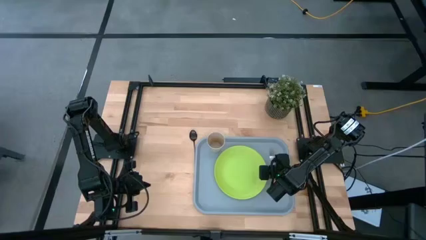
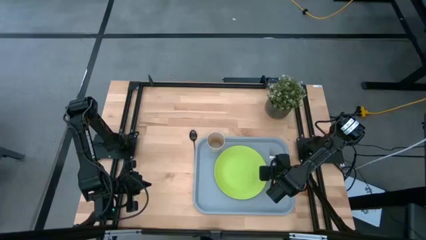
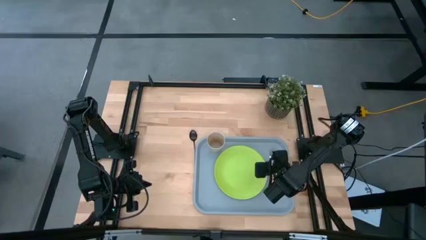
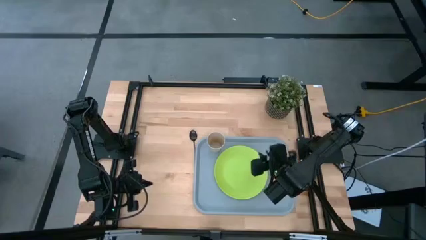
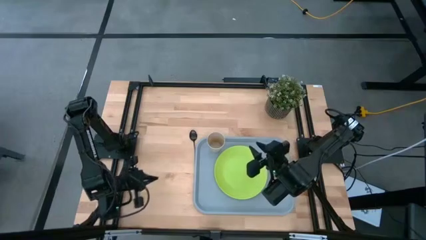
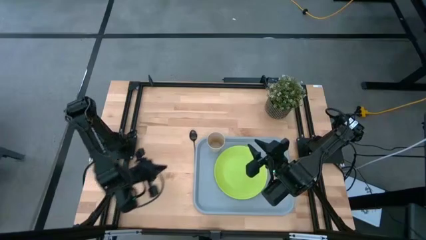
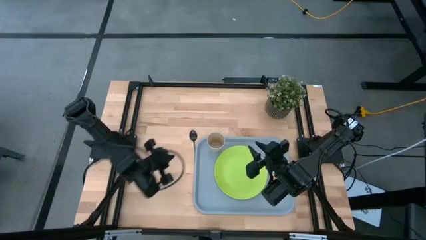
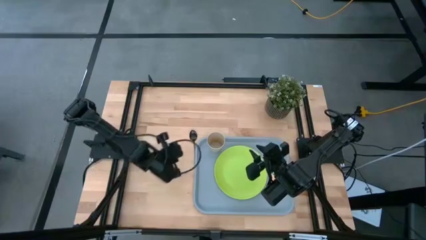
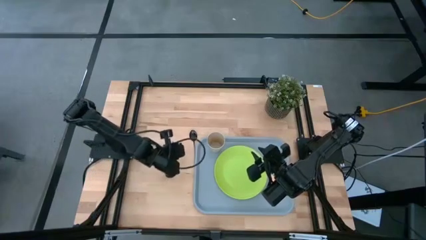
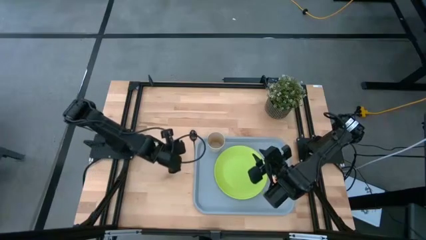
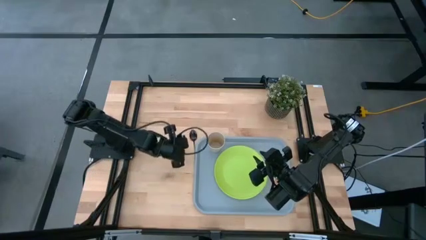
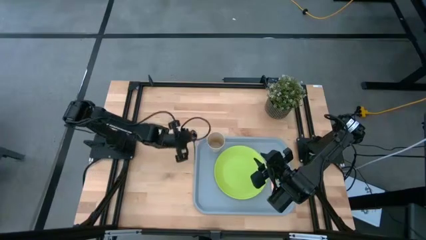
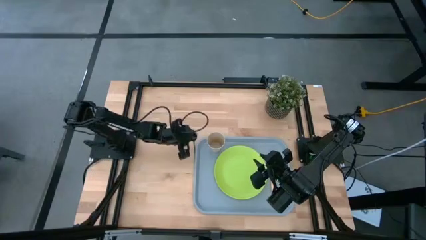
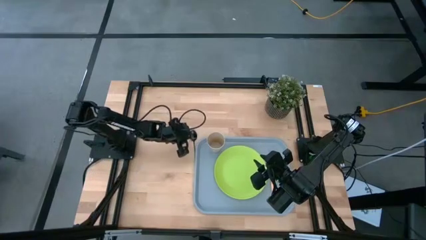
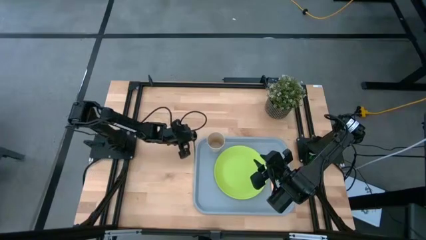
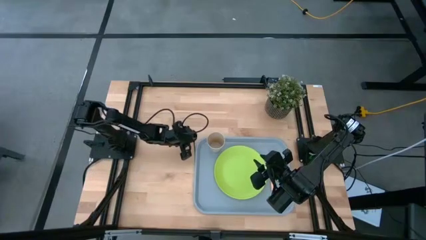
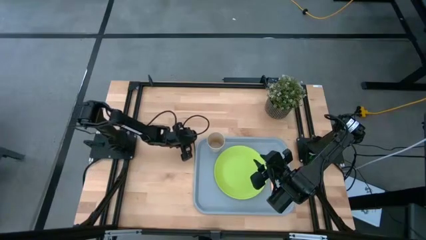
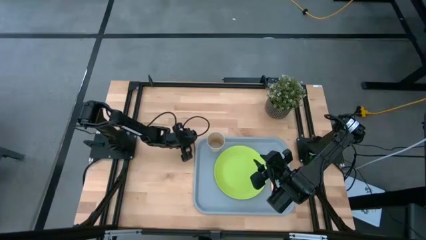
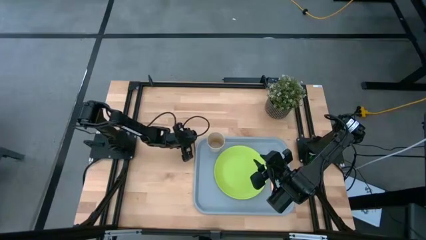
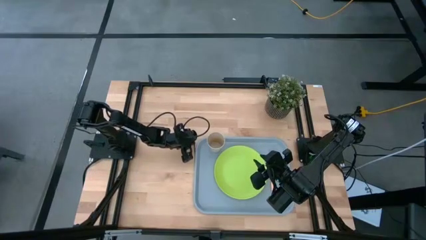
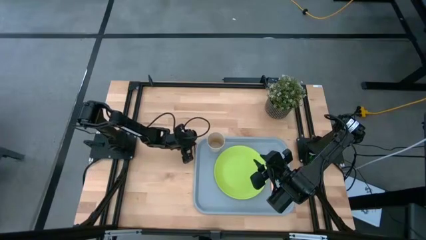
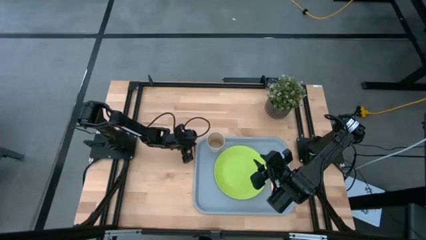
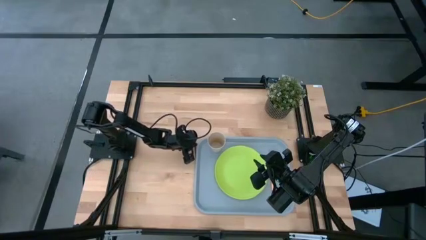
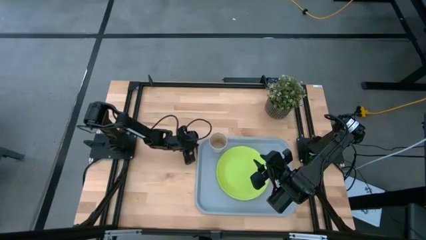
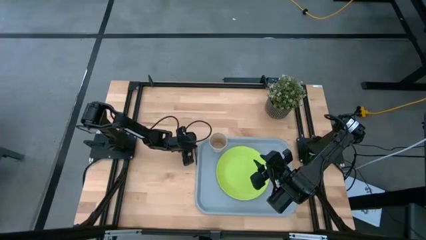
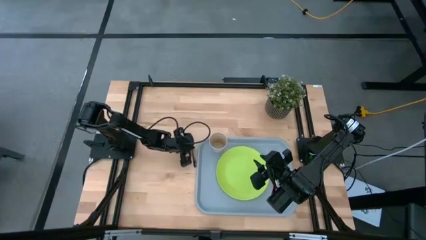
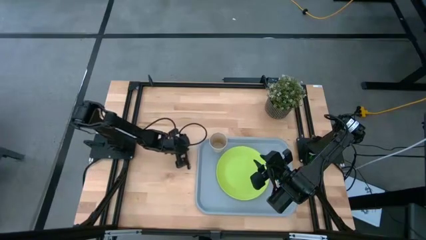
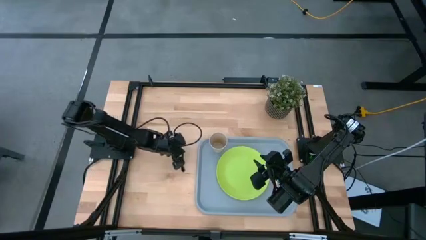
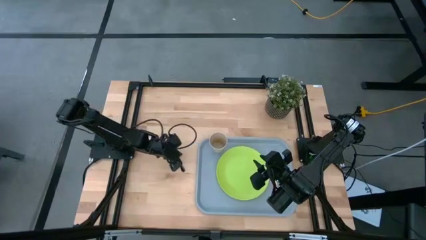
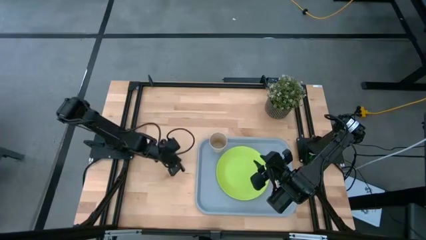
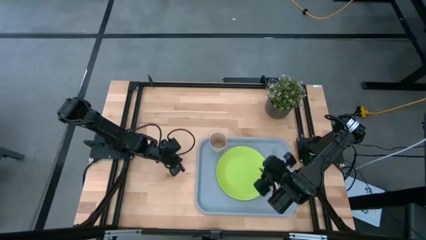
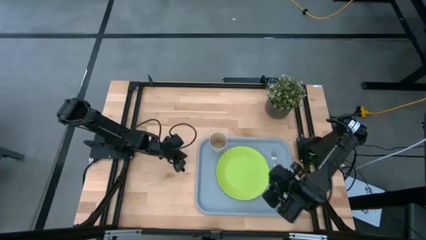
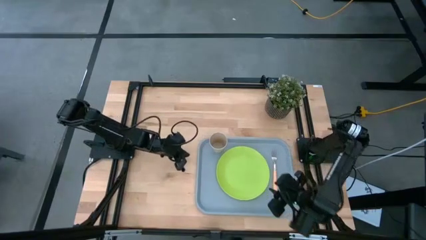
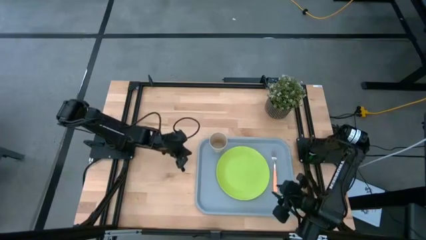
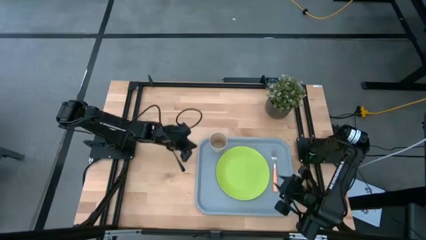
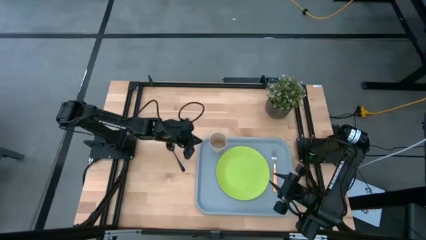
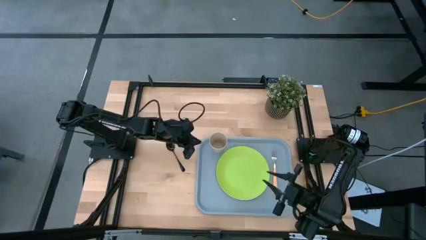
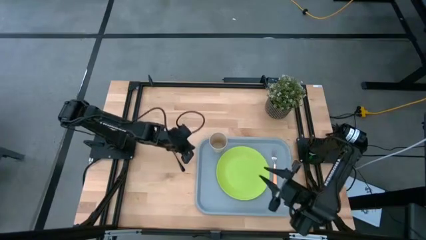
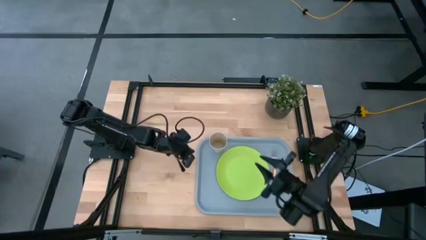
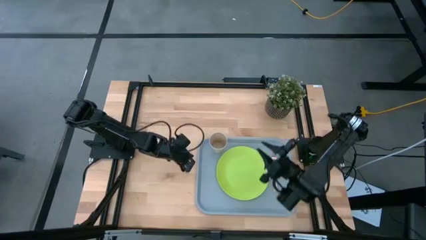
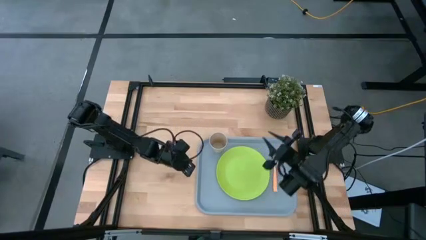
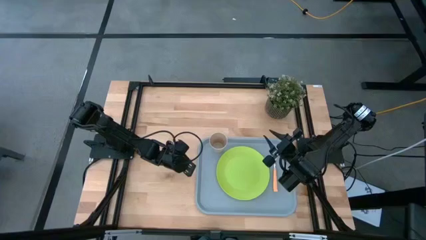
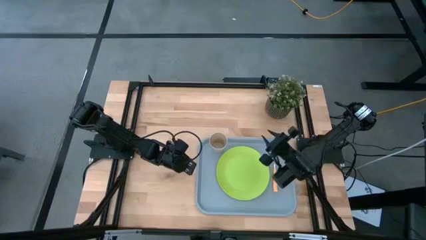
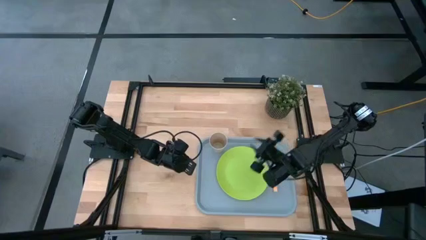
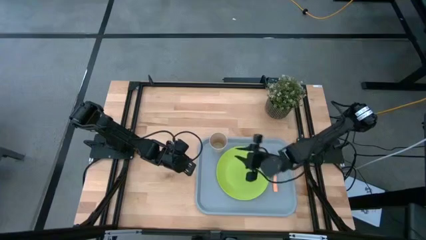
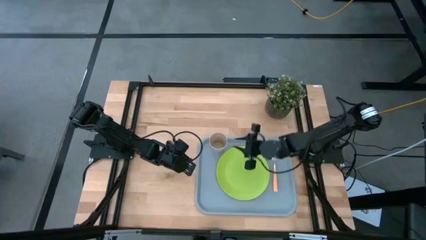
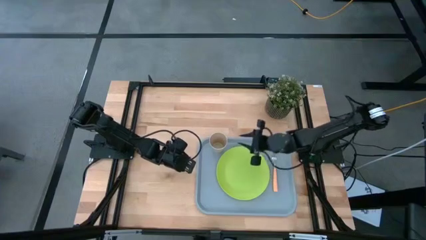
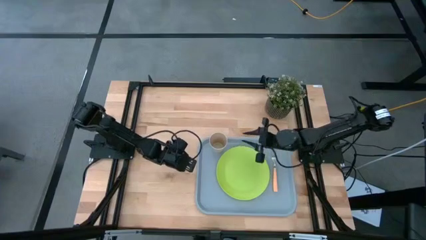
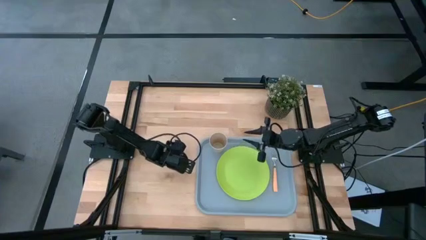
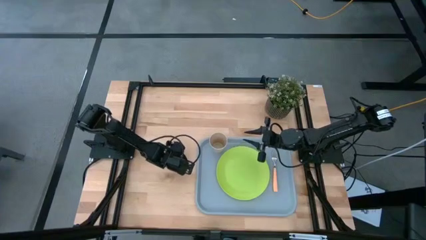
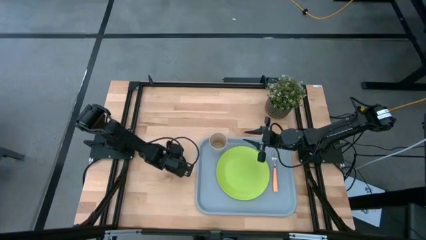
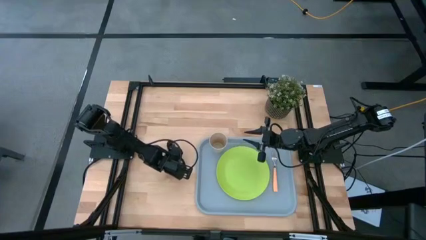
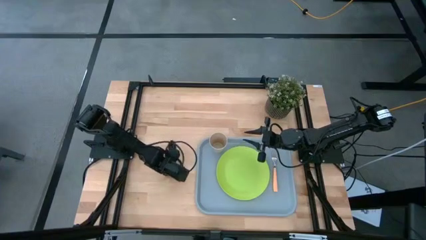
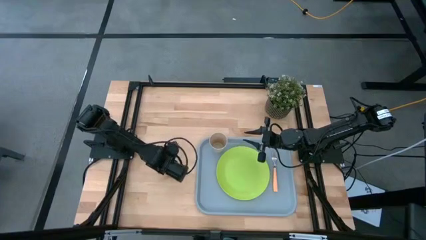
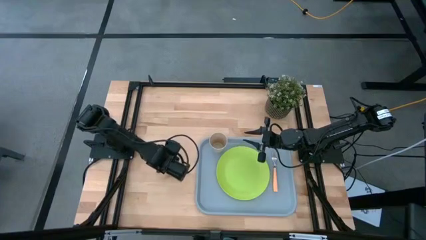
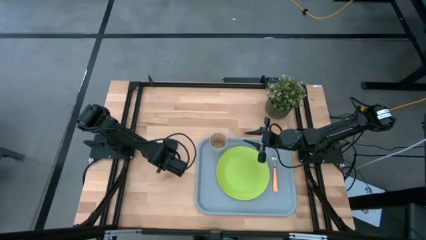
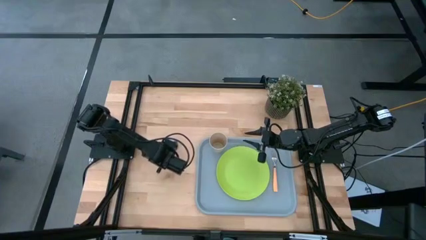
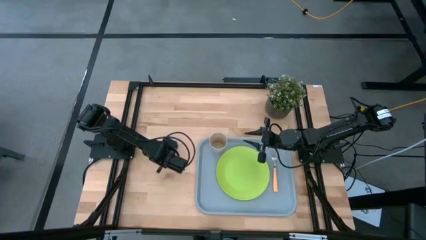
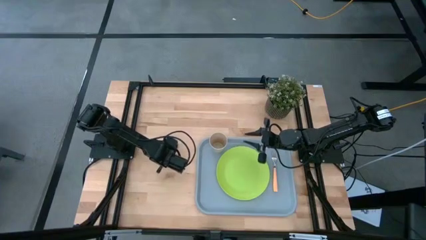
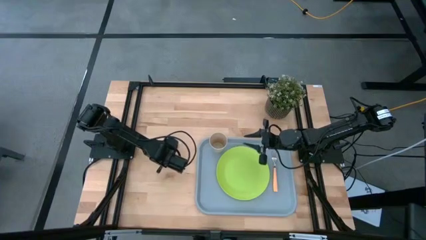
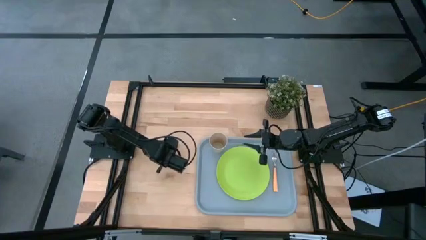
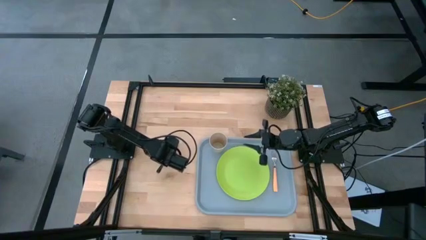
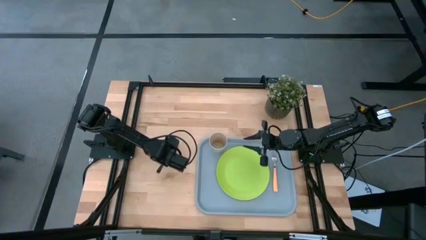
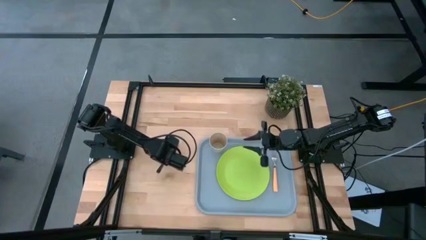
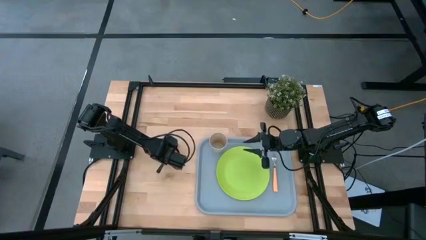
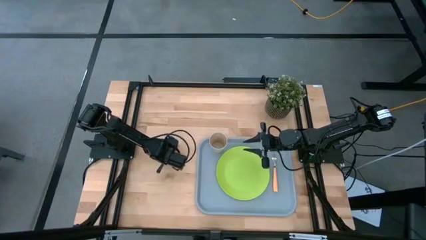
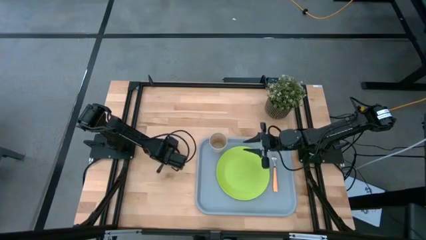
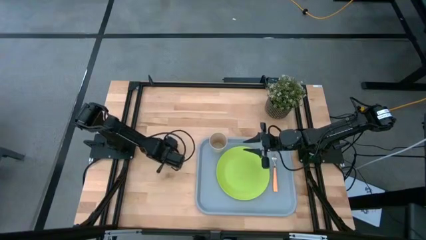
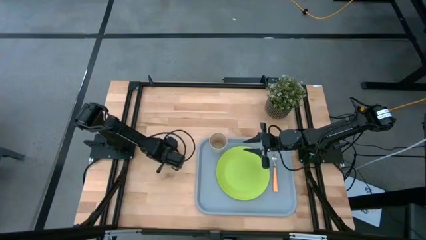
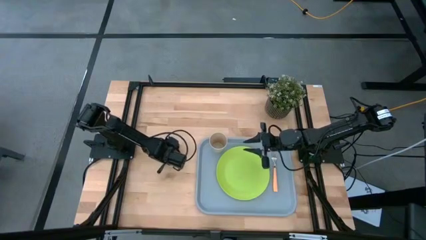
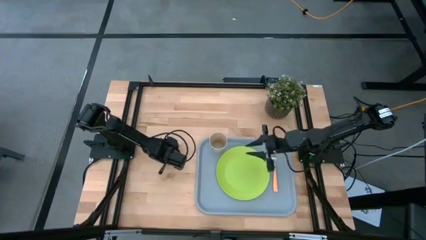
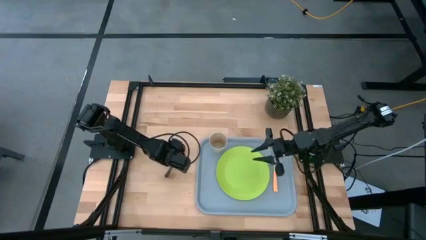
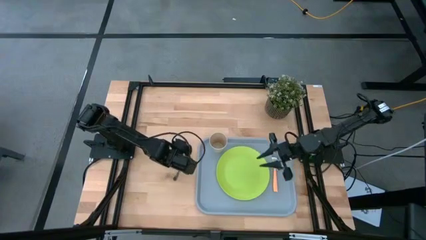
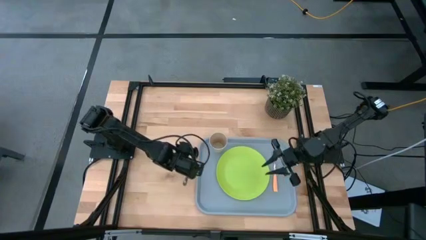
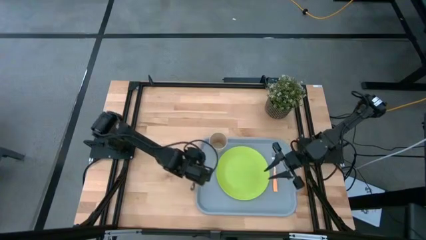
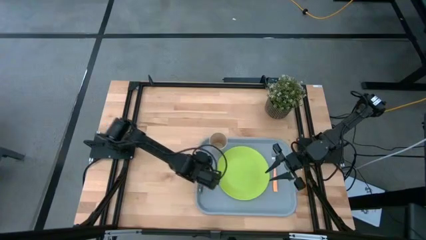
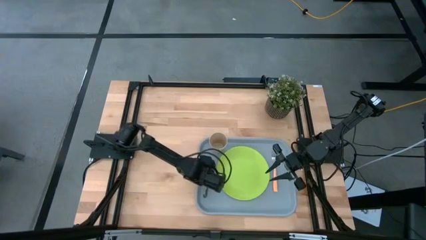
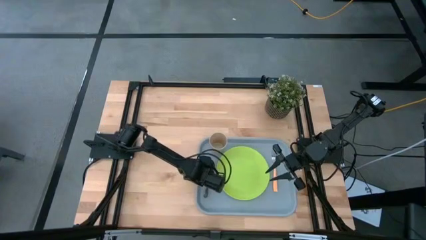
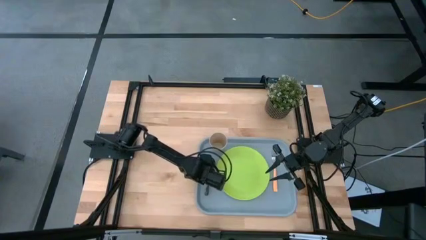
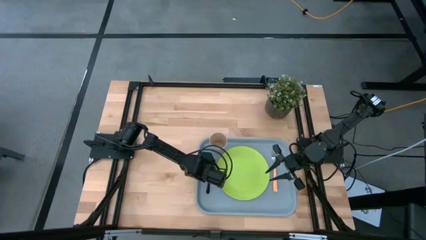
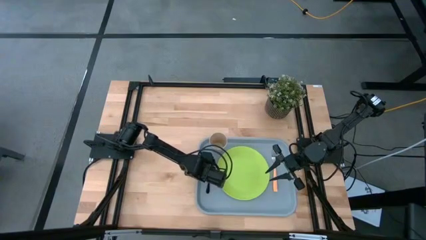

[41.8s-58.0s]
Task: Pick and place plate/cup/fork/spoon on tray
Put the black spoon on the gray serving tray to the left side of the green plate
